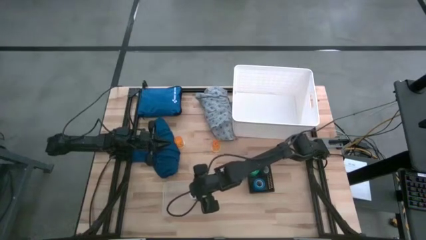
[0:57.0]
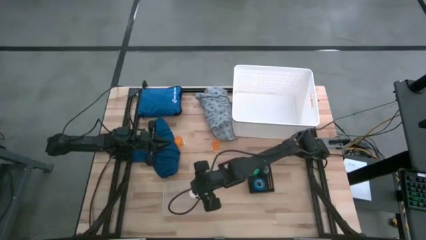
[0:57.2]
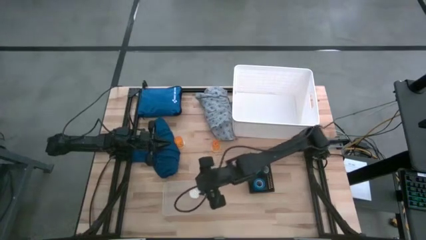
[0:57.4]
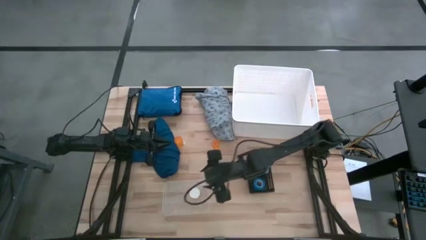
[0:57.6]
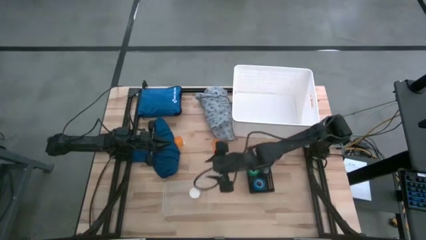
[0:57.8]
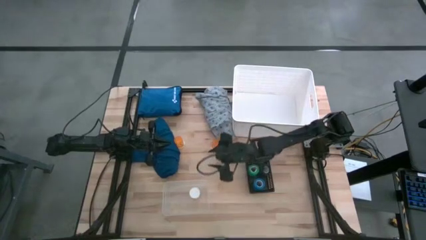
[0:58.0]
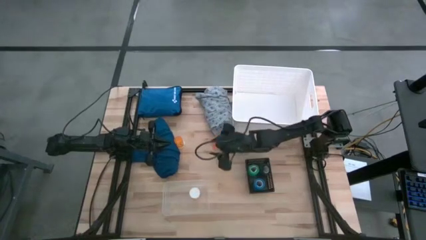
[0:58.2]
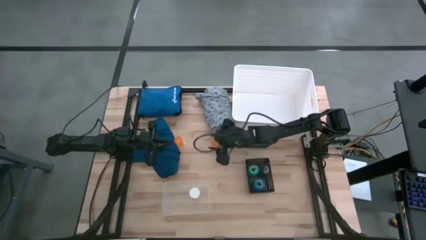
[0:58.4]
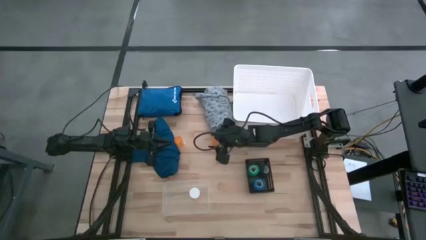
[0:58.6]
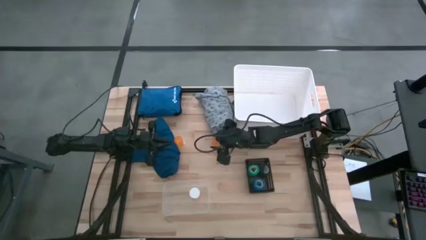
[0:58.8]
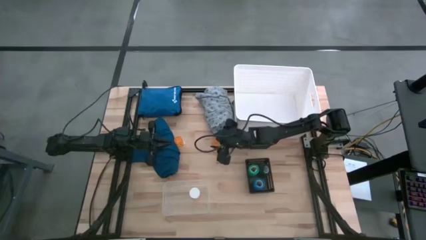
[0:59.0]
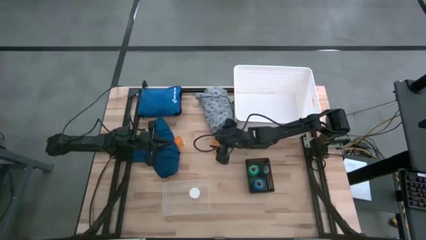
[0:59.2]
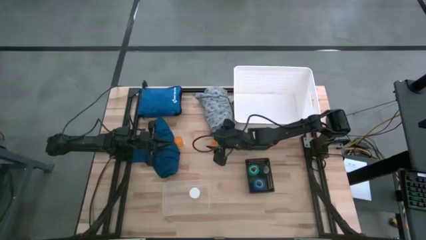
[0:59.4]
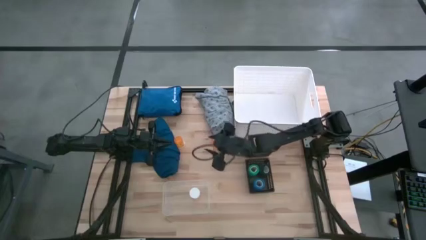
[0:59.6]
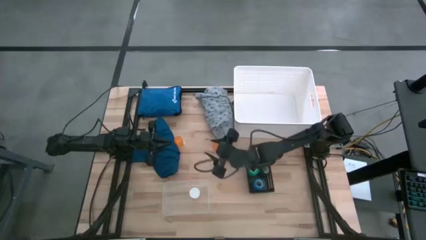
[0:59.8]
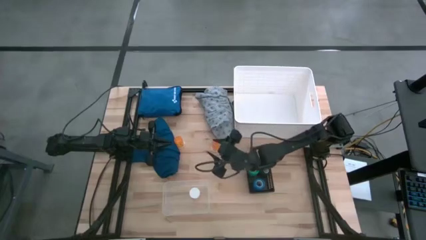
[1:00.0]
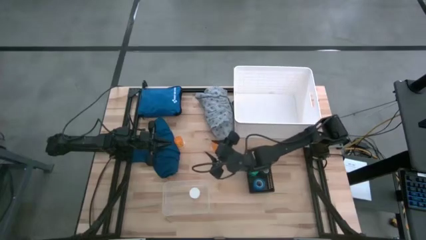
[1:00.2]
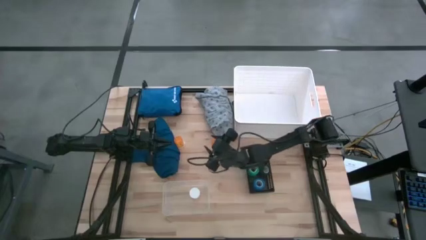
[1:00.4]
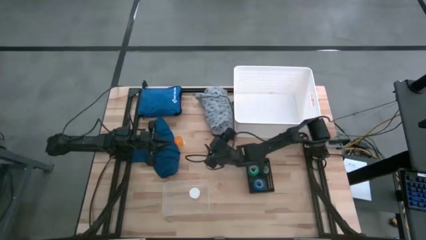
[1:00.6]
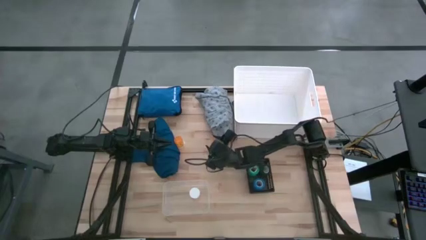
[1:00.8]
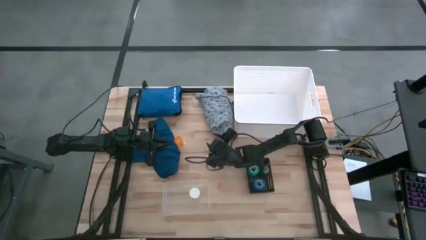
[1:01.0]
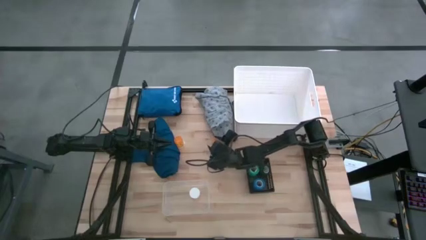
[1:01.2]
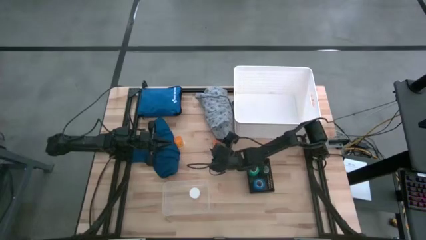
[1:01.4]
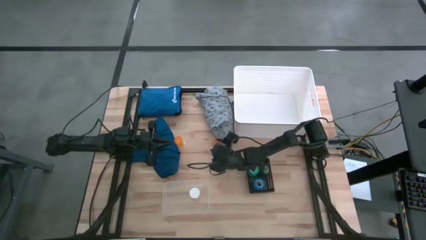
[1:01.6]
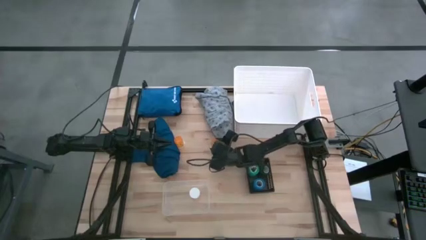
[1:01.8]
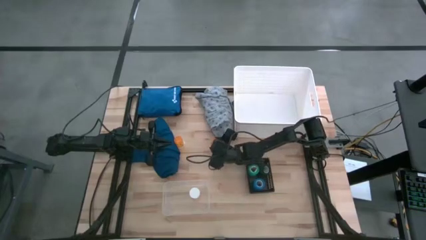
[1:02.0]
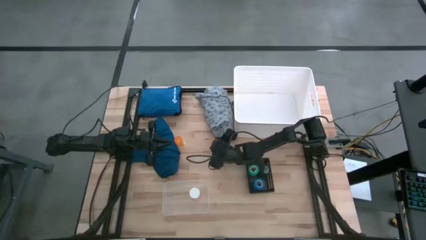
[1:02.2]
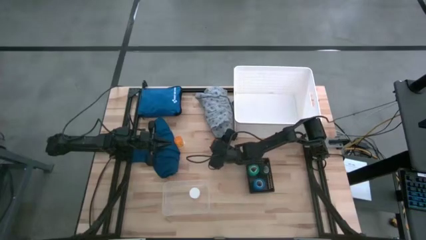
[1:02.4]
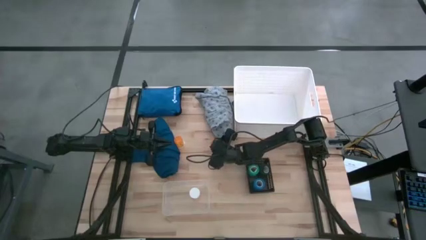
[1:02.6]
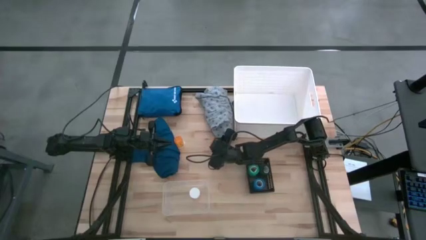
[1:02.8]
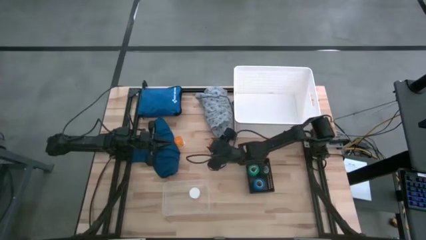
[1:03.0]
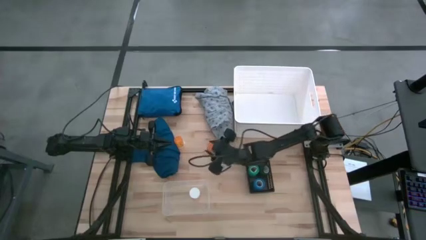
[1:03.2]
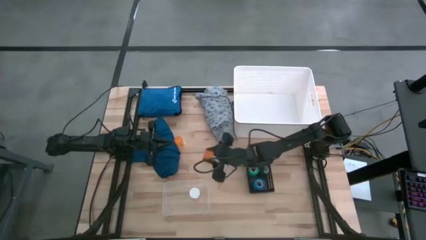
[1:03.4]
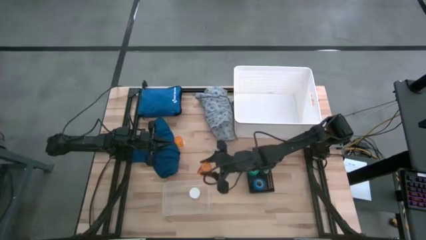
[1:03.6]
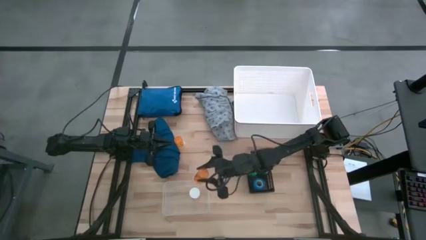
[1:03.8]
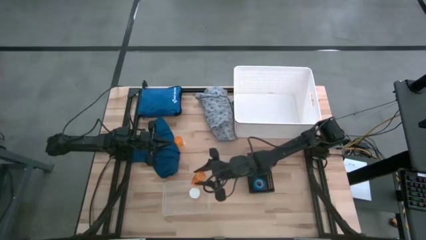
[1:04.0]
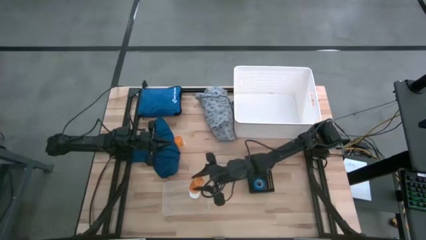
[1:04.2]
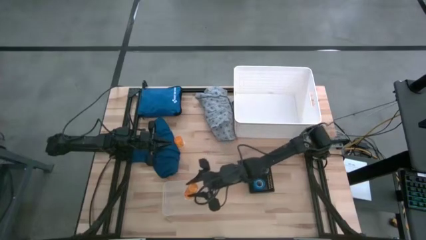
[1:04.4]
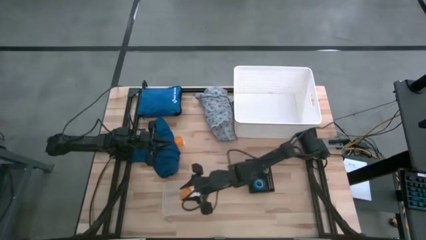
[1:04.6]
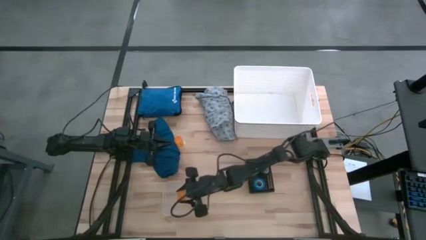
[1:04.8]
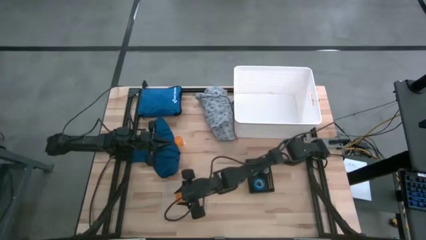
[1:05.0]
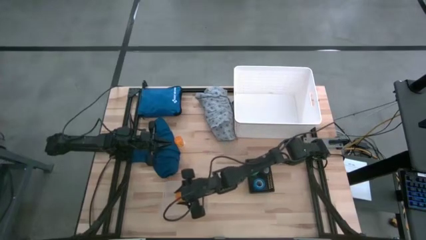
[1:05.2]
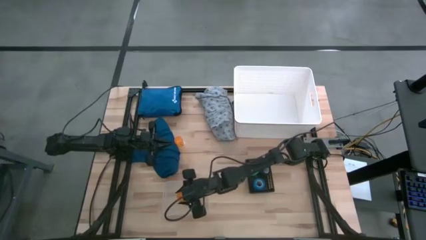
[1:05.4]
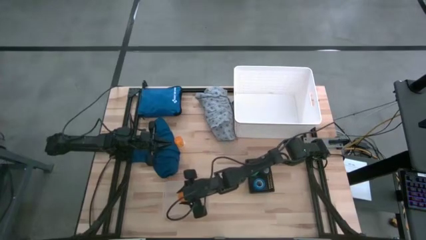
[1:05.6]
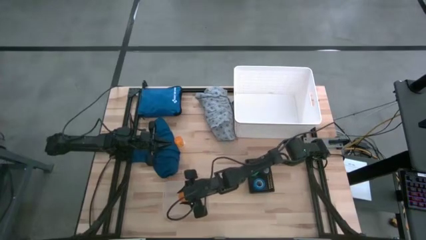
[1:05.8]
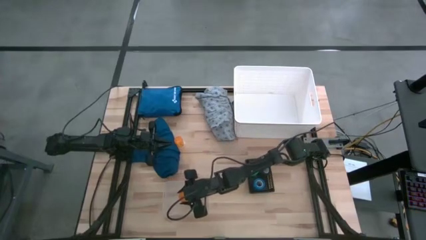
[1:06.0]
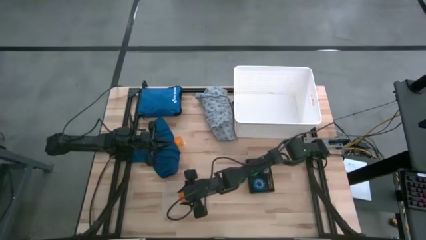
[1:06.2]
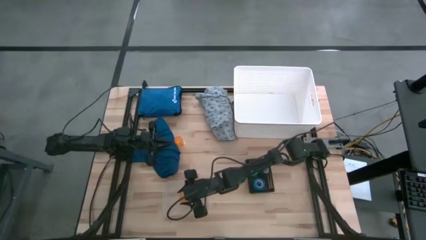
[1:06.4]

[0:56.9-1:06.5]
Task: Pick & place medical supplies in basket/bin
Put the right orange pill bottle into the transparent bin

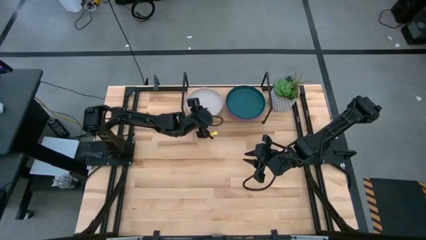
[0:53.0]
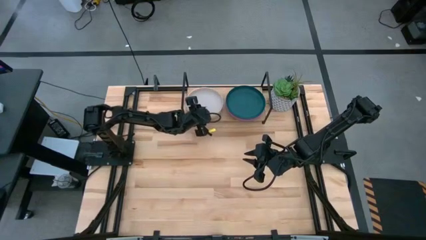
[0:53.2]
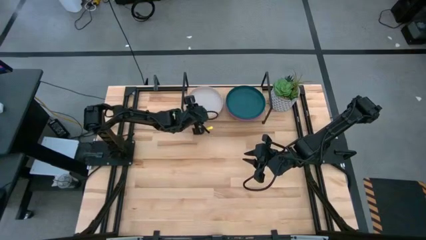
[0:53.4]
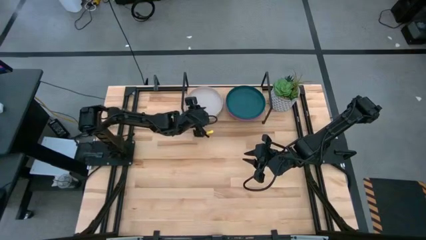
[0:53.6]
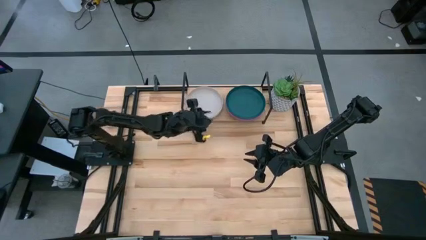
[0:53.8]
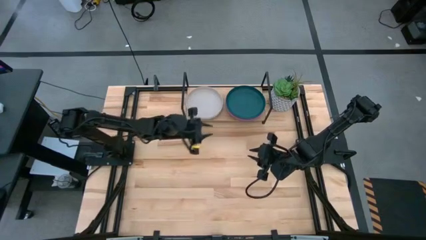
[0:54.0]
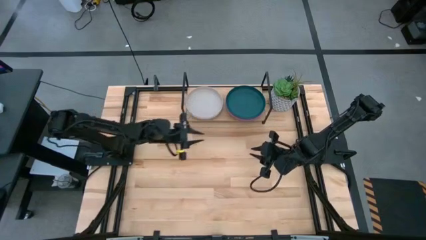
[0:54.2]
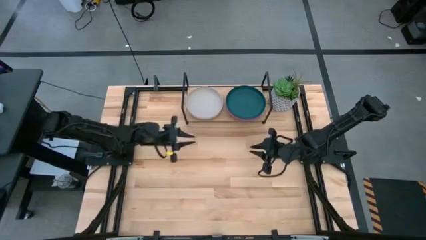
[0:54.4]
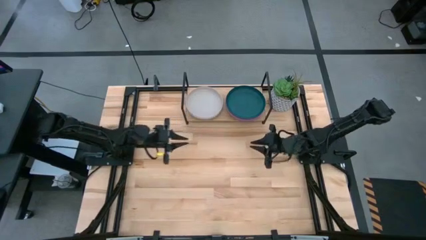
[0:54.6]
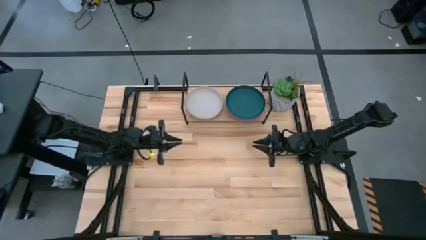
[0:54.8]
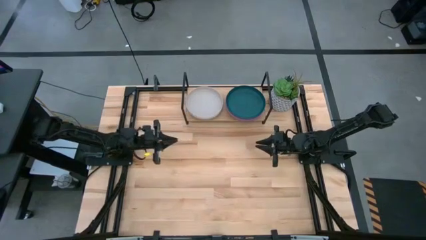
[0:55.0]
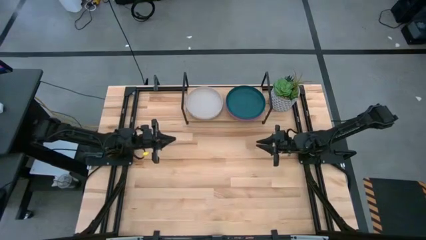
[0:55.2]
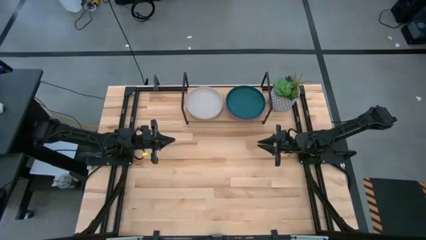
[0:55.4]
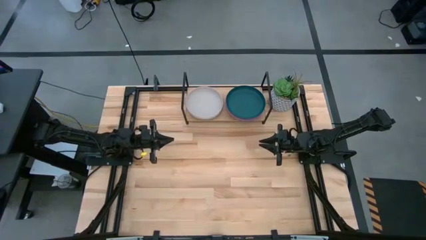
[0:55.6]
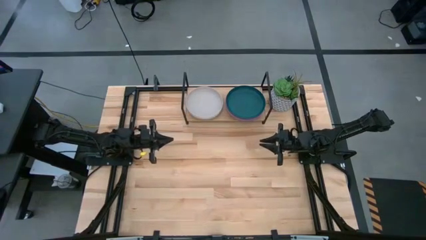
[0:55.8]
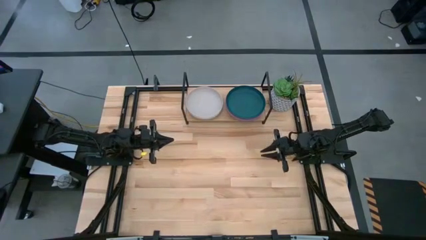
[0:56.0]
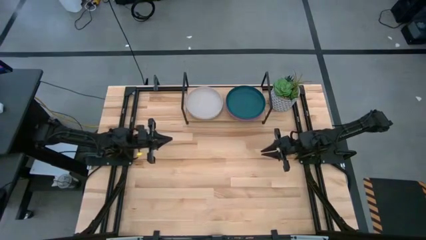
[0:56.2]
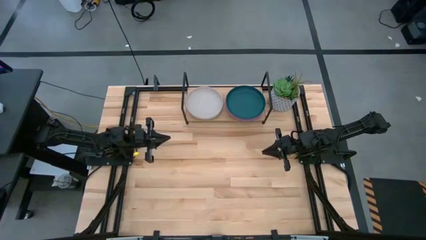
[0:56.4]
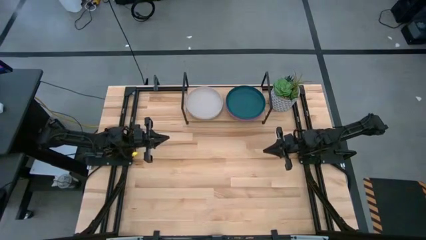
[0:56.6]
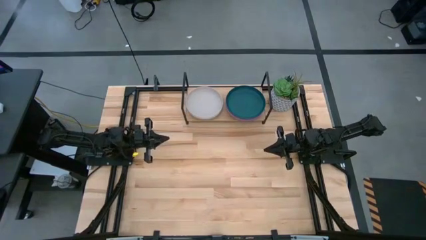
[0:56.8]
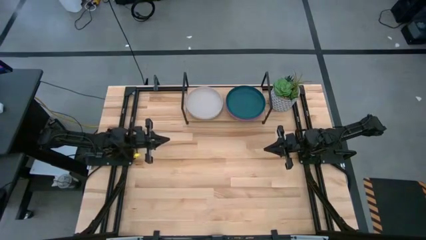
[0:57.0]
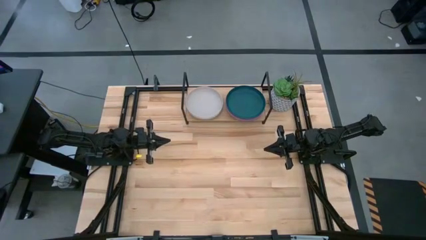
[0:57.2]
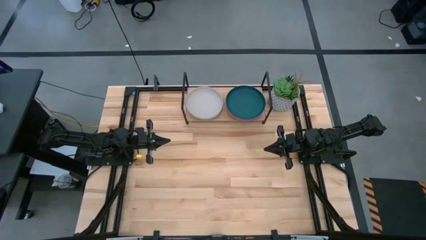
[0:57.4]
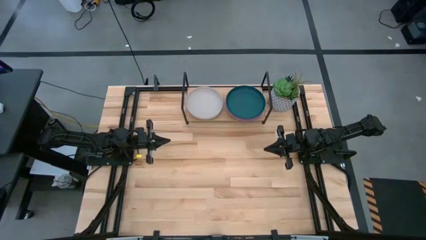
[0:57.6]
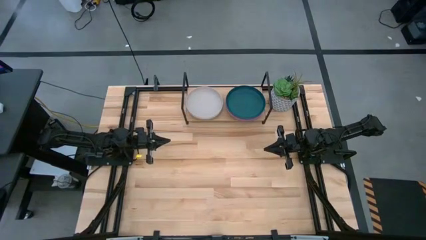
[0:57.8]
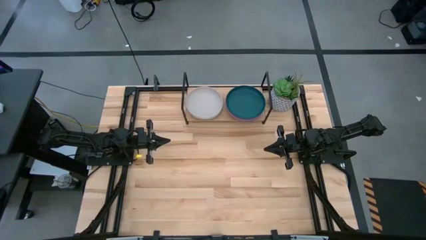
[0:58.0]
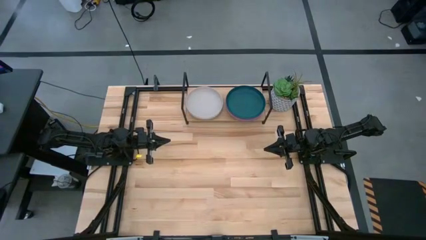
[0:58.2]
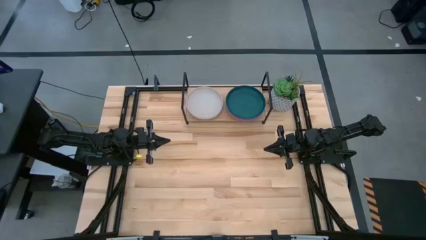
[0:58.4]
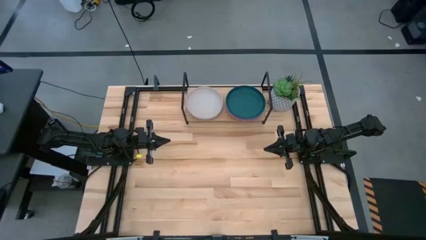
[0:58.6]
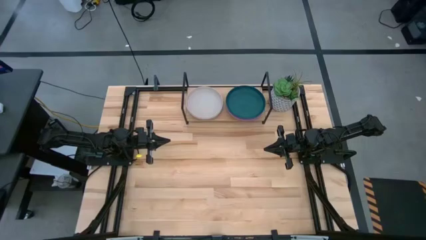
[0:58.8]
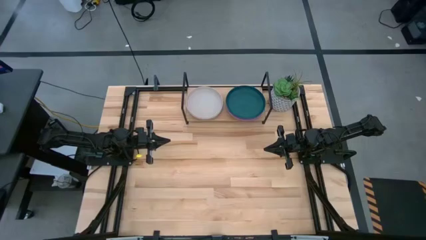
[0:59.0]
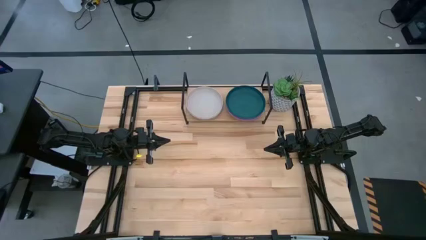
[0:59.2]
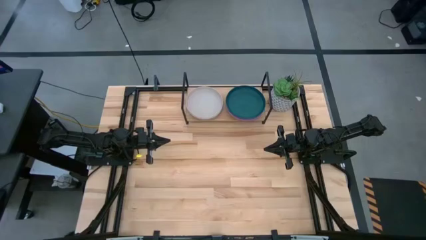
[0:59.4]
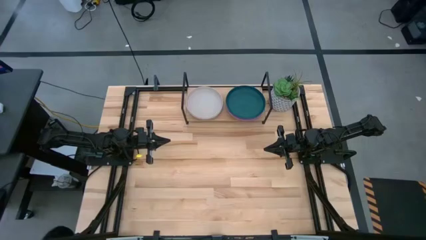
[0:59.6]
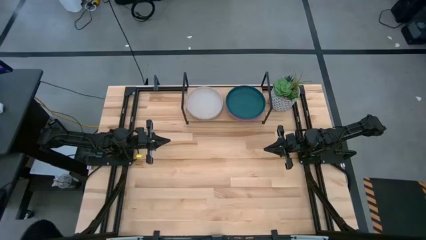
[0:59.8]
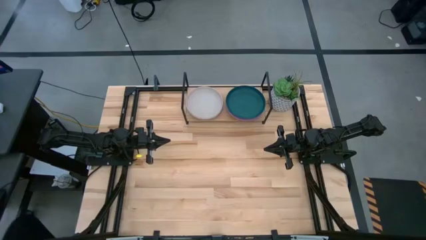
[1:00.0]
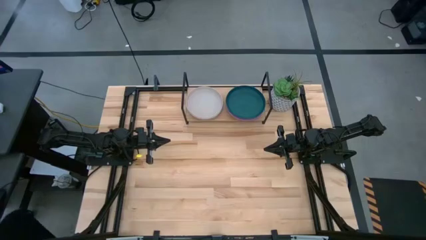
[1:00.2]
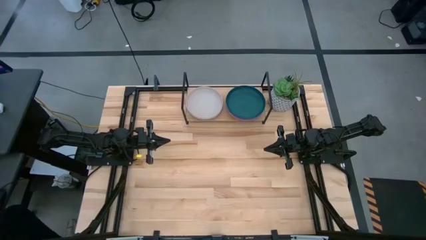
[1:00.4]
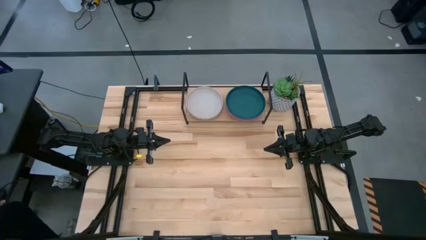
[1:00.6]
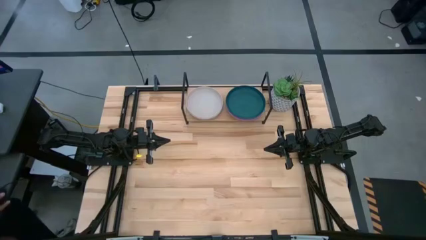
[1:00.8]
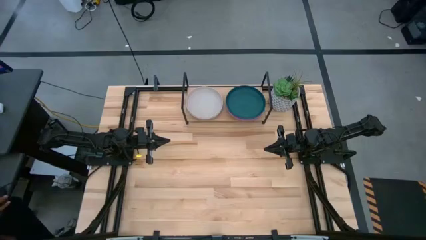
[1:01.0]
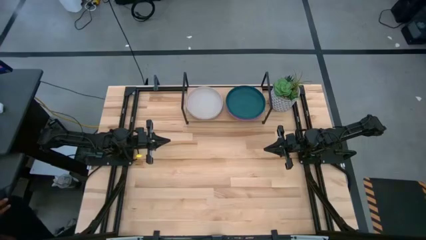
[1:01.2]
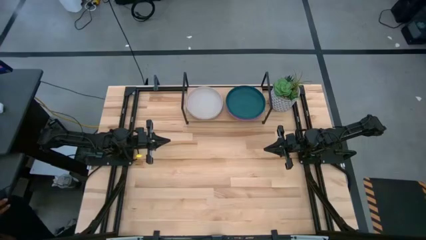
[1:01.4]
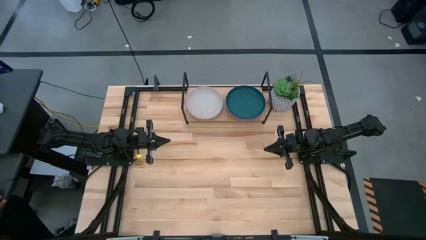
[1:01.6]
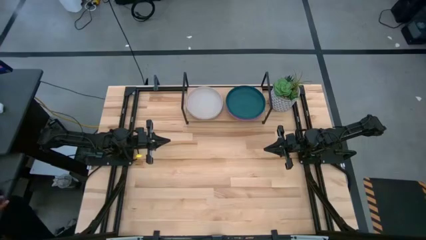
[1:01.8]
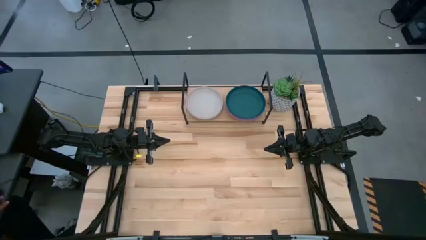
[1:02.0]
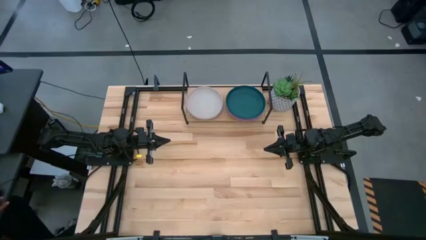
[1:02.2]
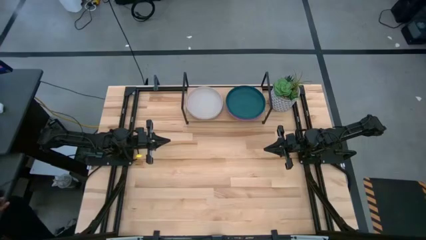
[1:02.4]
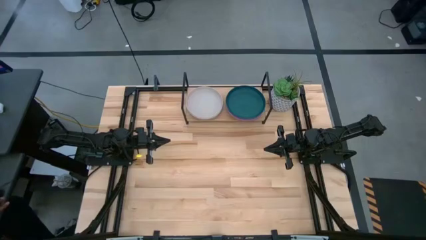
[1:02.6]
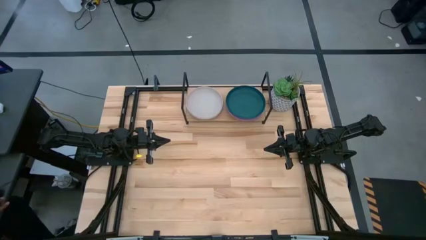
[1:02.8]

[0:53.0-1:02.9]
Task: Place and stack plates onto a shelf
Return to Home Position
